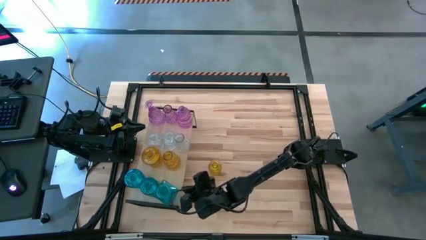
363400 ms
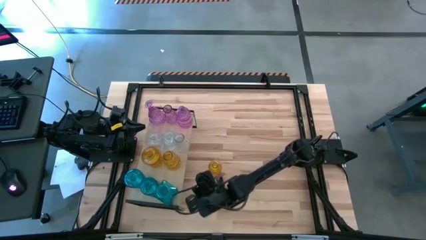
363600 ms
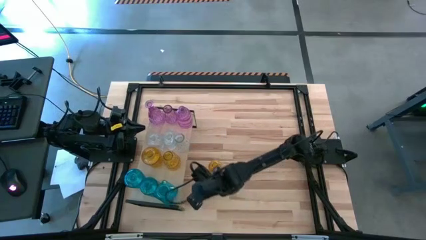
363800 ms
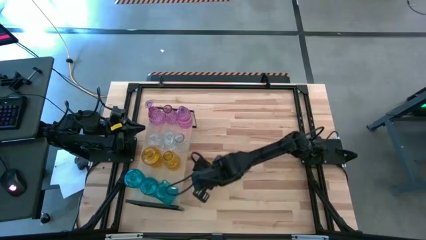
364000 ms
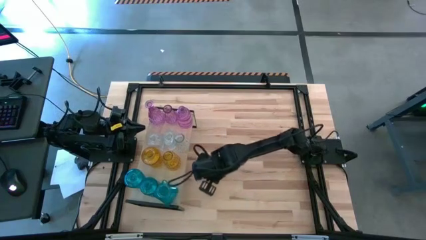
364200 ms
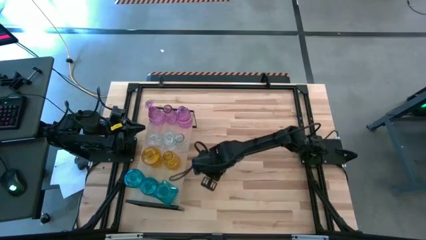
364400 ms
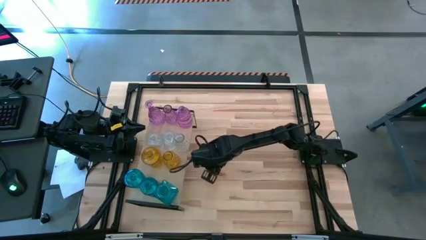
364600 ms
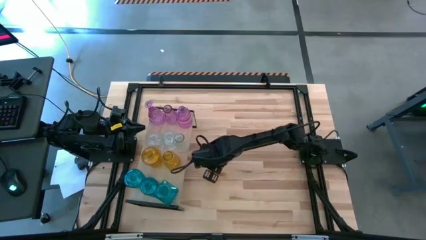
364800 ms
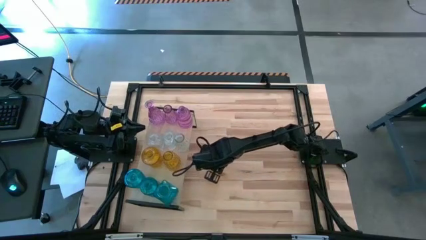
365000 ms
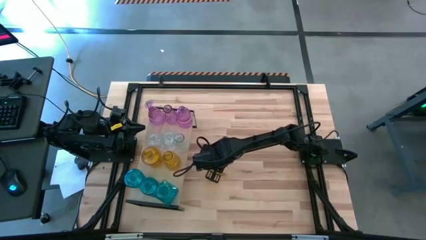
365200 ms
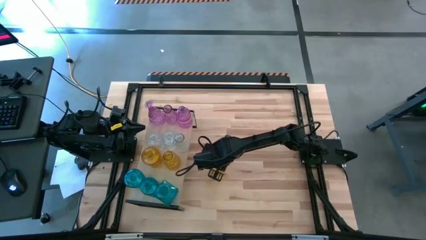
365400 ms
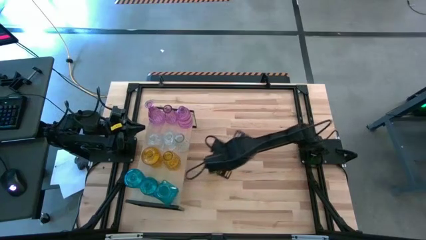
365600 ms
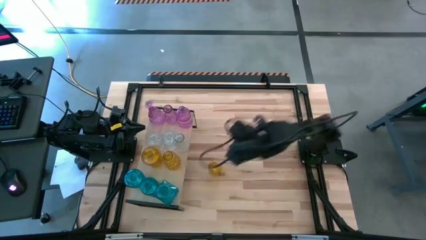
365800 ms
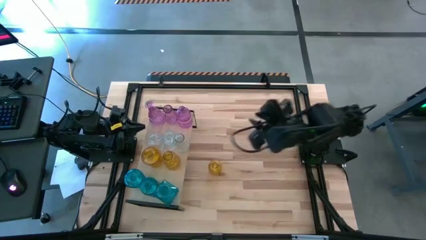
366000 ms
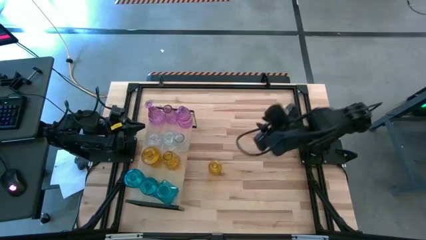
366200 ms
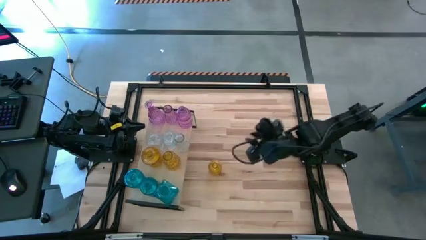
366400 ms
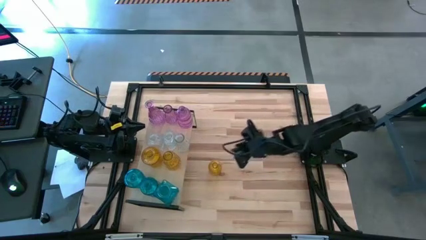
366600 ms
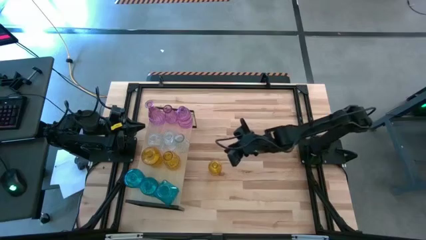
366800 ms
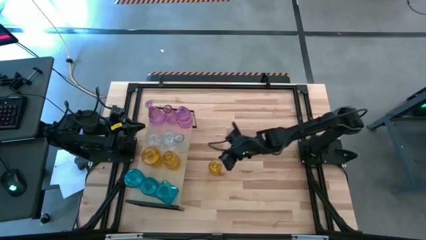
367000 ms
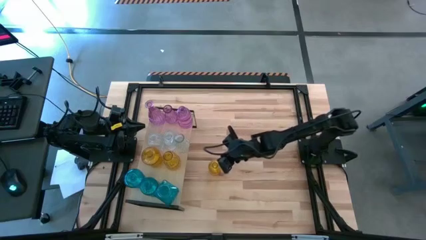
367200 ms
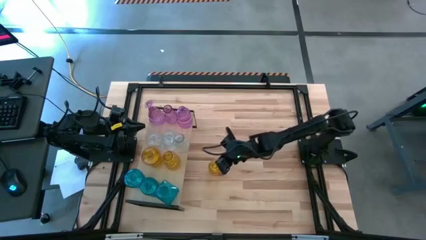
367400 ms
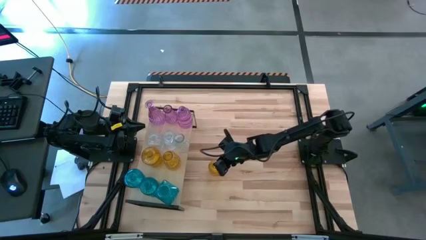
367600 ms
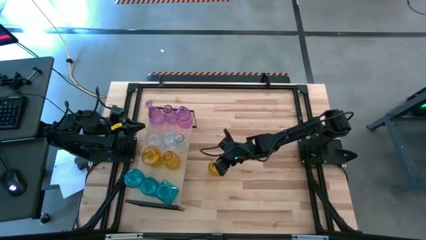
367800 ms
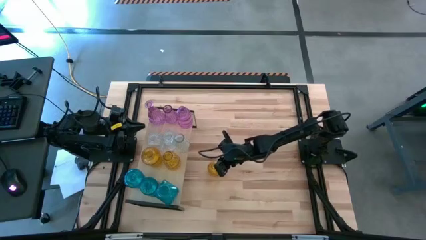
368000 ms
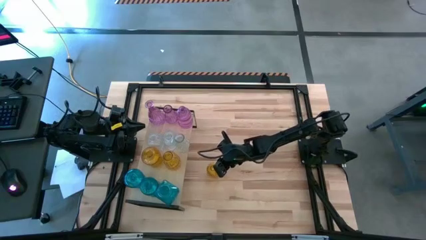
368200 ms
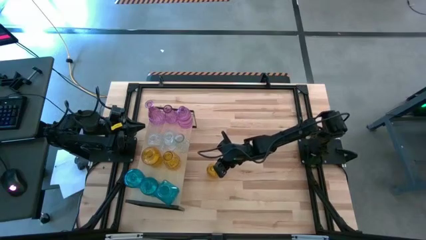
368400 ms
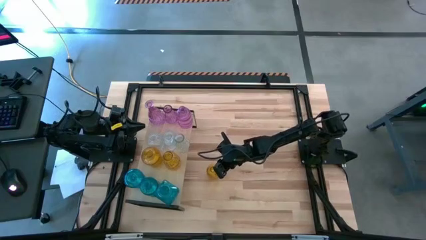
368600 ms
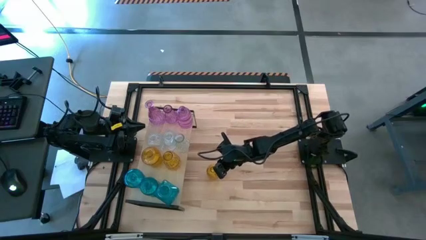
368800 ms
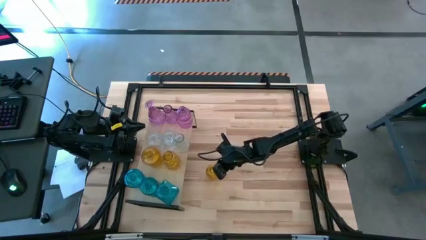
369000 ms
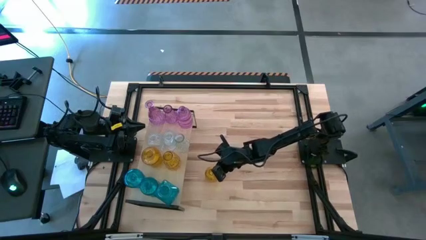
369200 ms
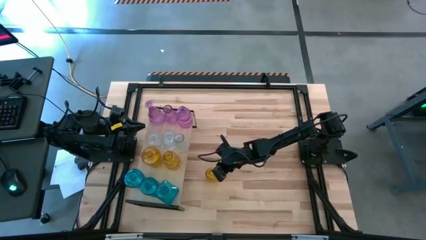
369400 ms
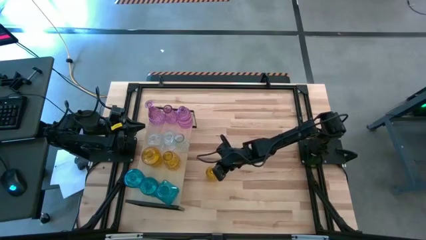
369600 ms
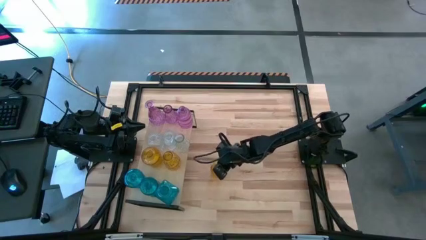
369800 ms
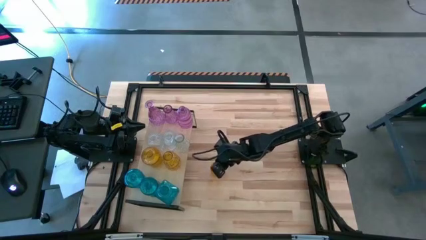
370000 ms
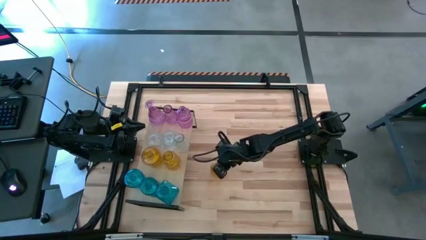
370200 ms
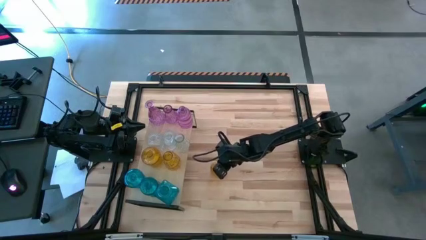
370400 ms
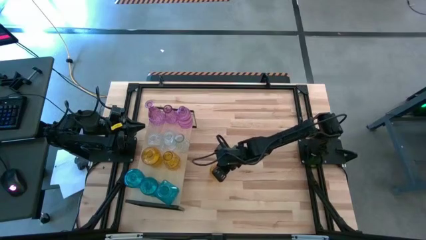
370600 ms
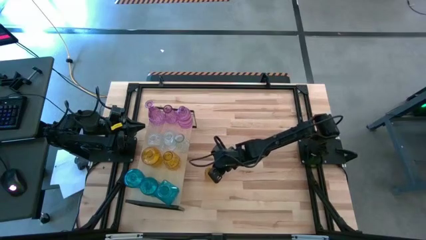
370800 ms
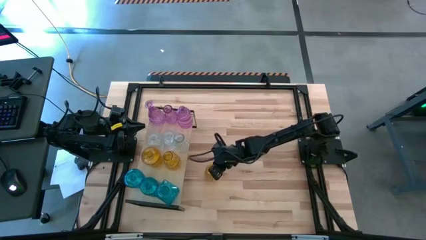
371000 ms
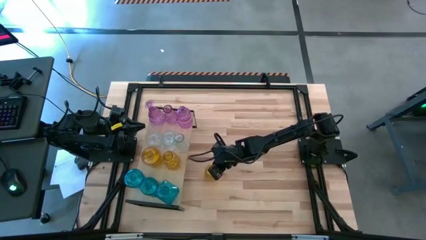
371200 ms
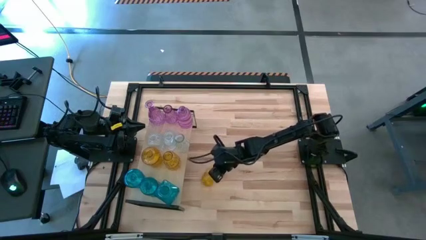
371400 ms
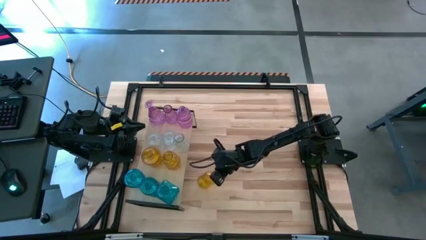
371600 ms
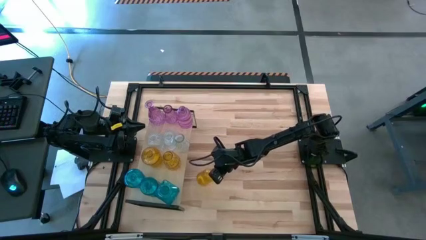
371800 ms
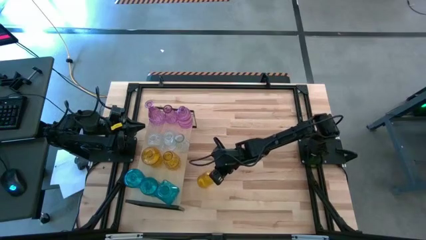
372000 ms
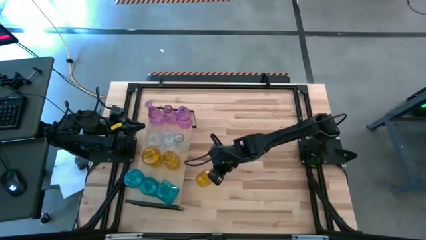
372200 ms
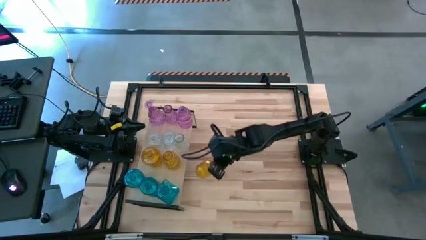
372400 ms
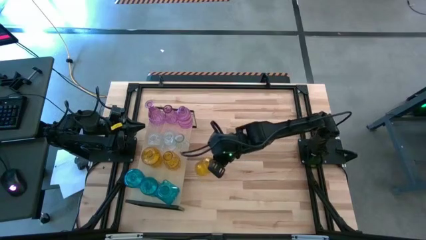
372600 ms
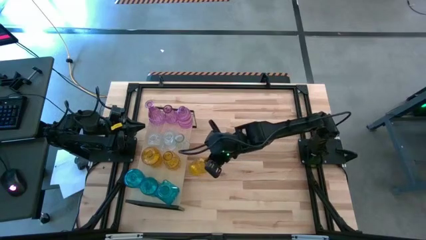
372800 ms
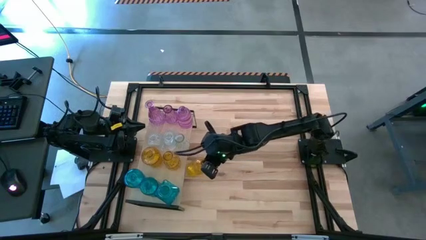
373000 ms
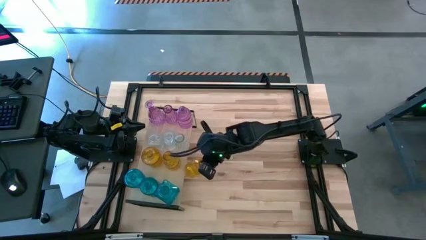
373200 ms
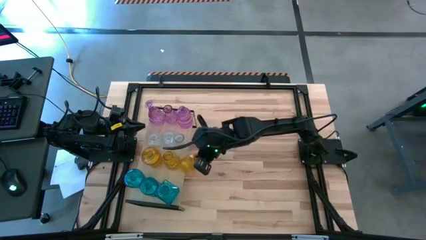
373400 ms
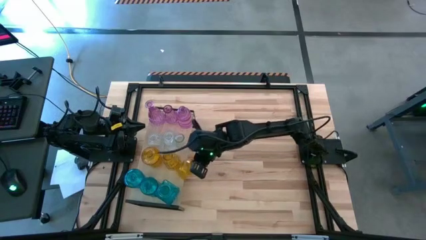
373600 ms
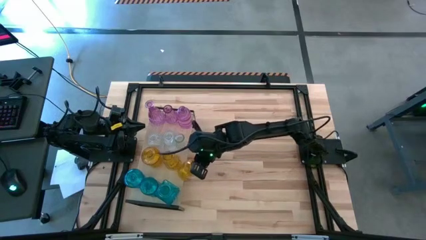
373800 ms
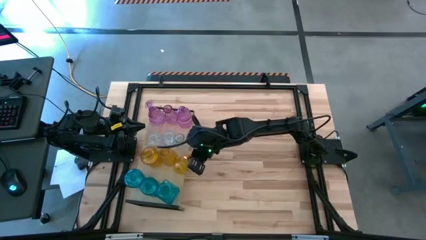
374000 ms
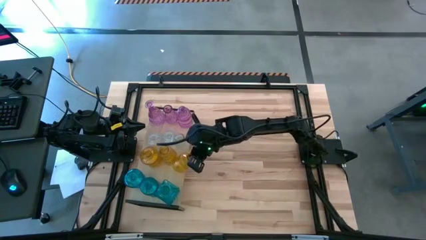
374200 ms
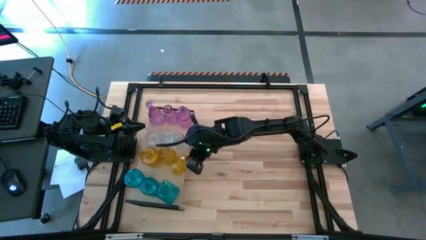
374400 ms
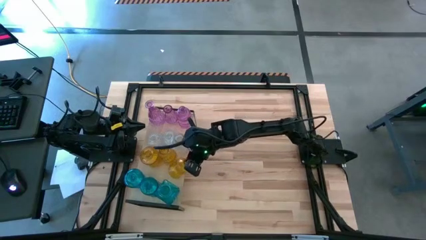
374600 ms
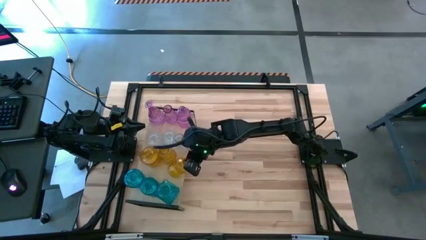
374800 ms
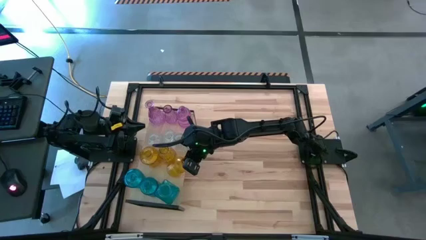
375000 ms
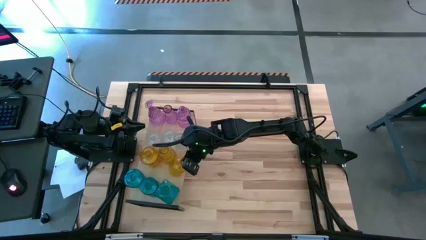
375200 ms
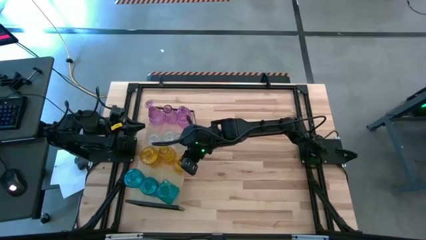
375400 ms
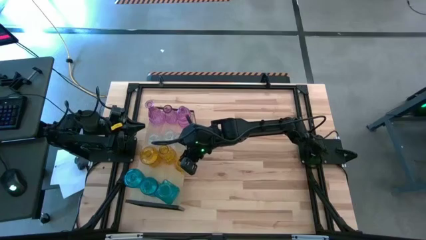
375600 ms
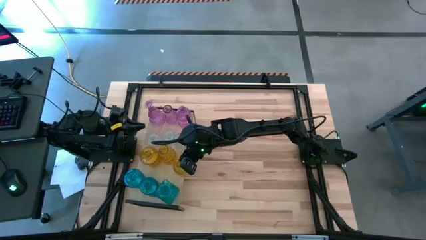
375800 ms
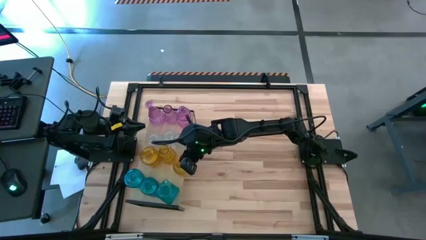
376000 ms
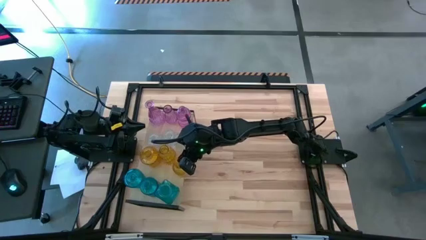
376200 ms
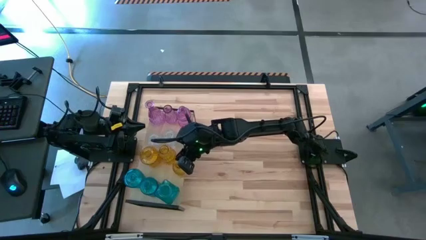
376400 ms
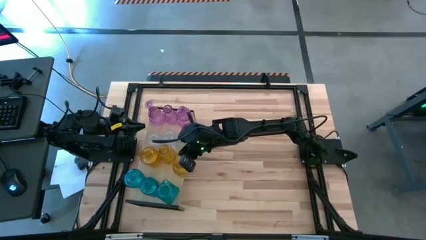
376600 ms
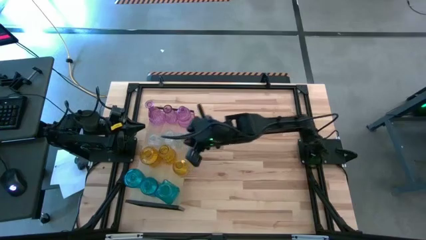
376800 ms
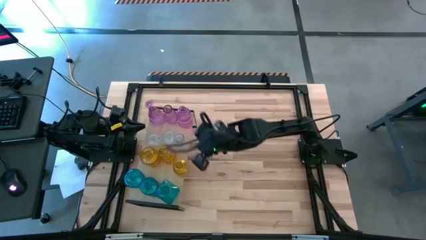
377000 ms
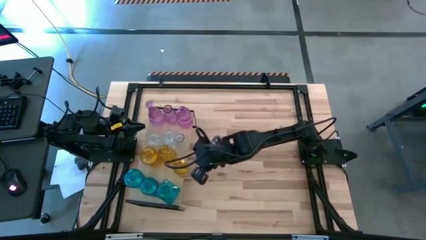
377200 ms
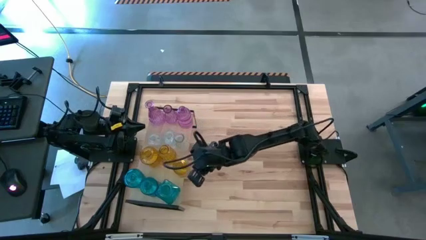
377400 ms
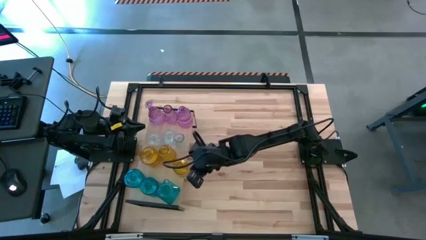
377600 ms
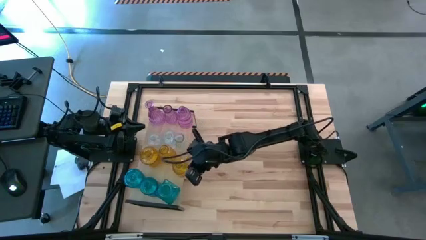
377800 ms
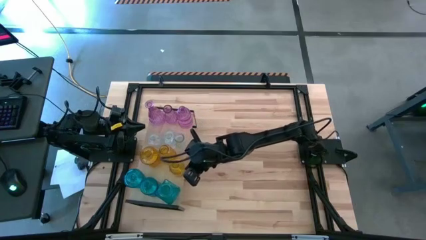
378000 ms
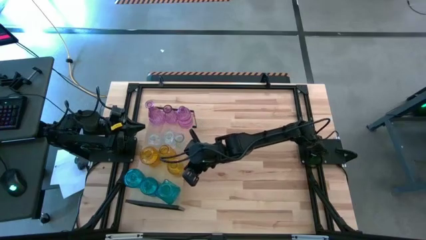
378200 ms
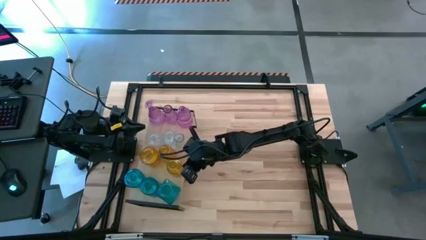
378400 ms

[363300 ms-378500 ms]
Task: sort vases onto shelf
Put the yellow flower vases on the shelf
